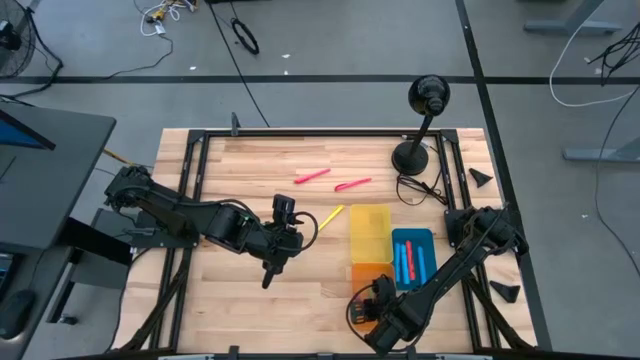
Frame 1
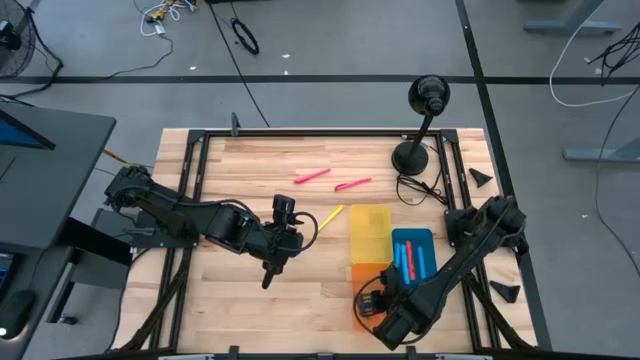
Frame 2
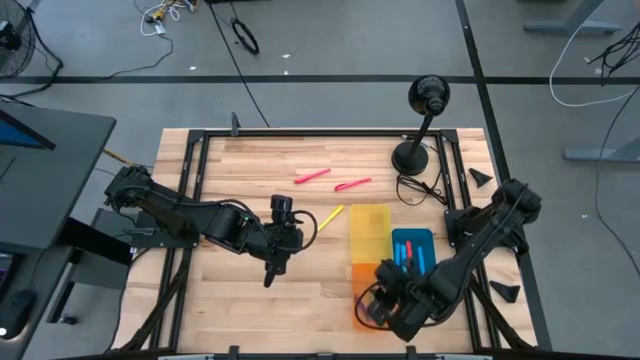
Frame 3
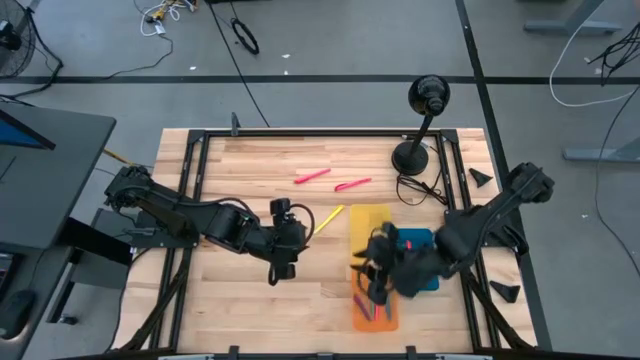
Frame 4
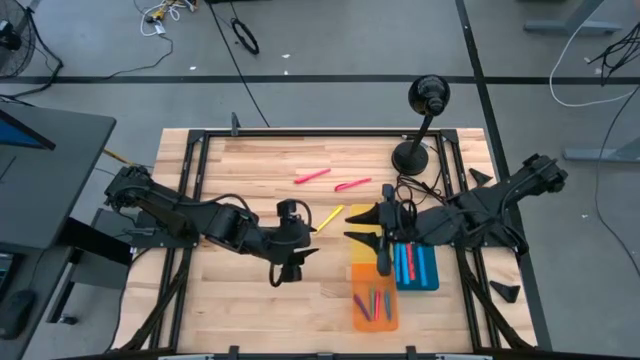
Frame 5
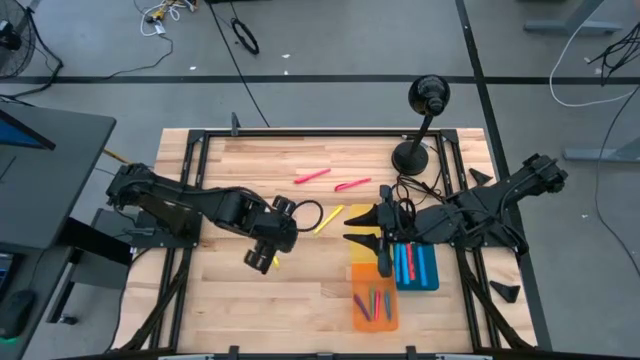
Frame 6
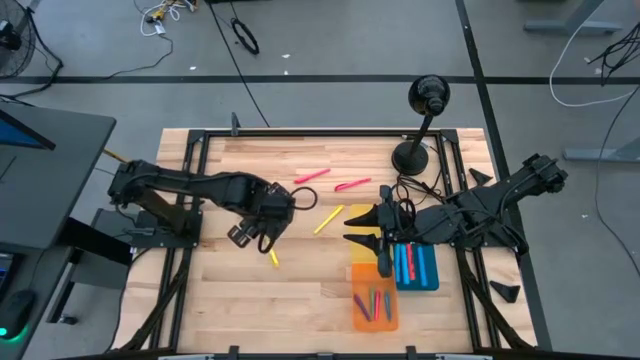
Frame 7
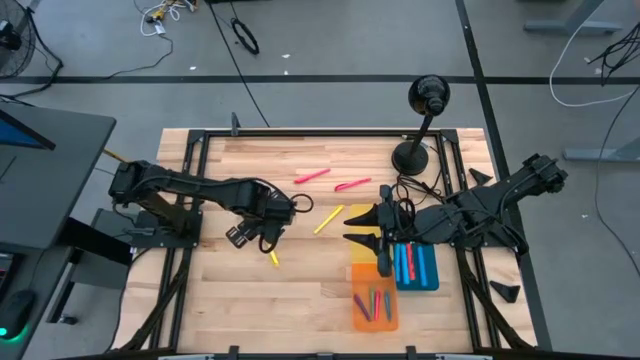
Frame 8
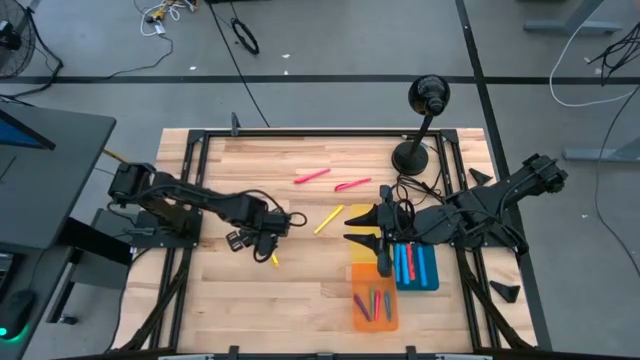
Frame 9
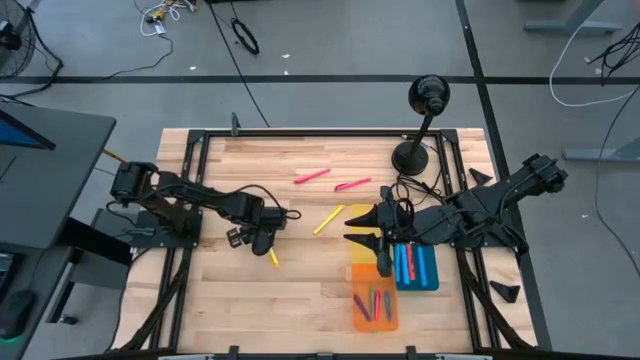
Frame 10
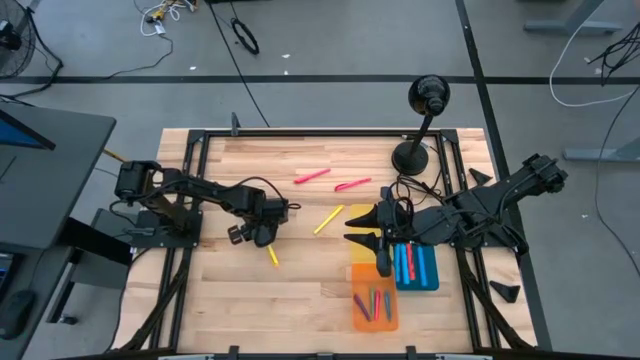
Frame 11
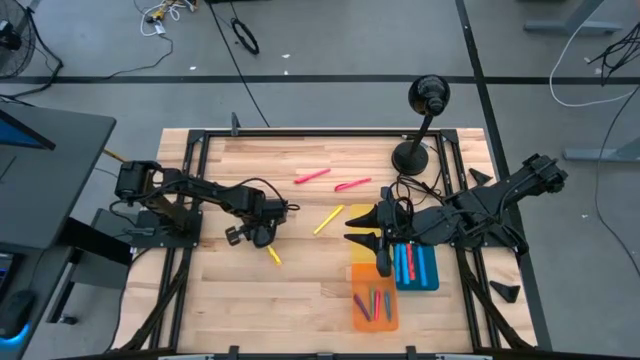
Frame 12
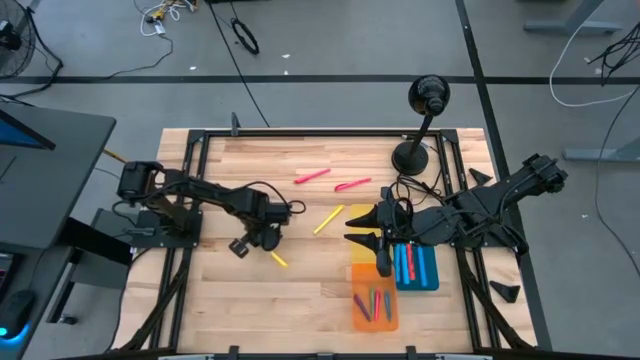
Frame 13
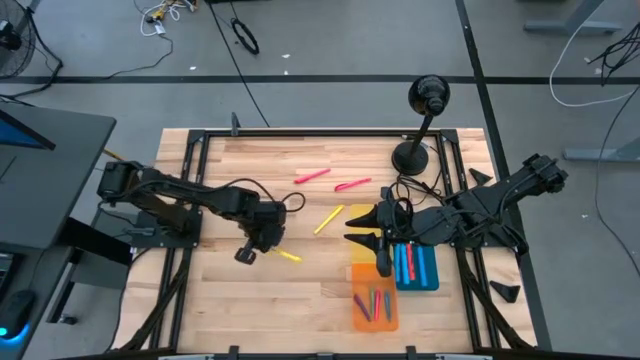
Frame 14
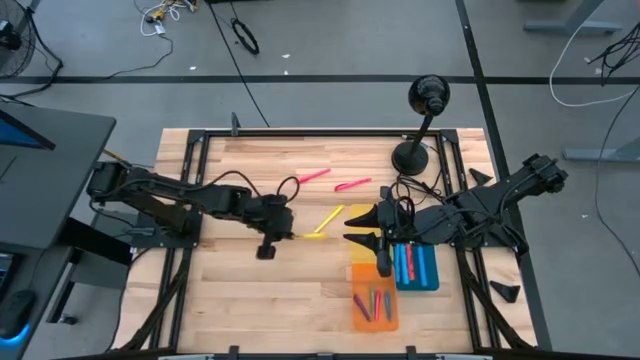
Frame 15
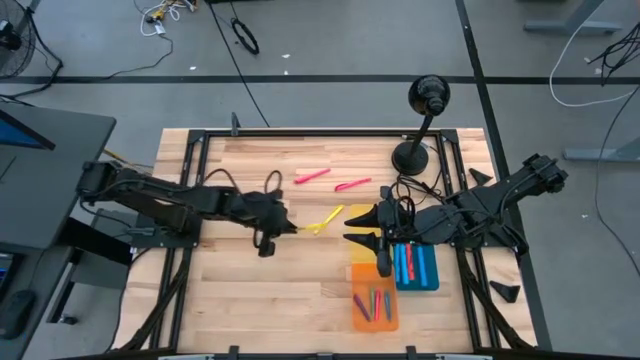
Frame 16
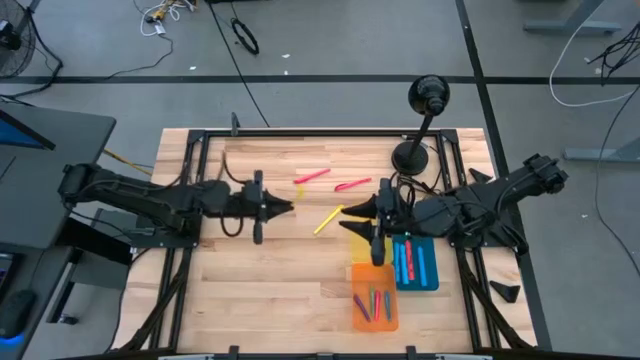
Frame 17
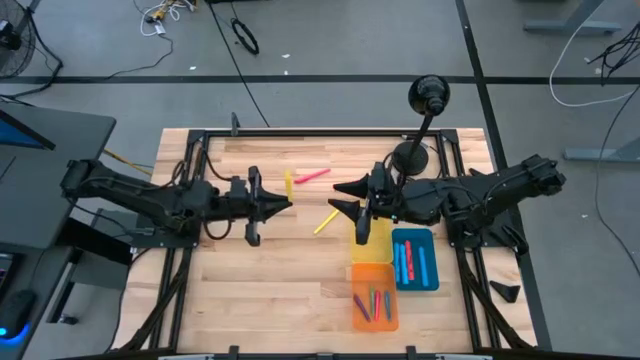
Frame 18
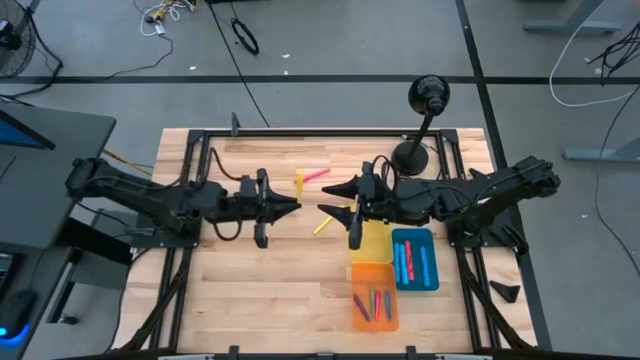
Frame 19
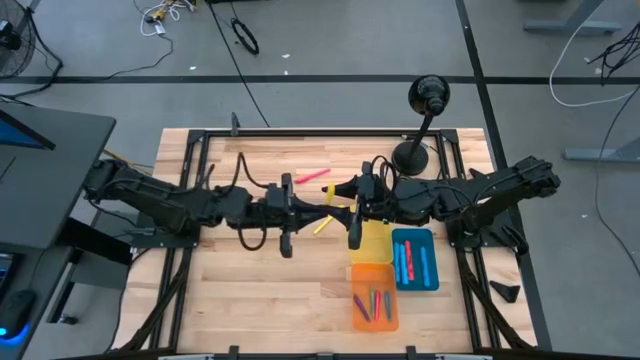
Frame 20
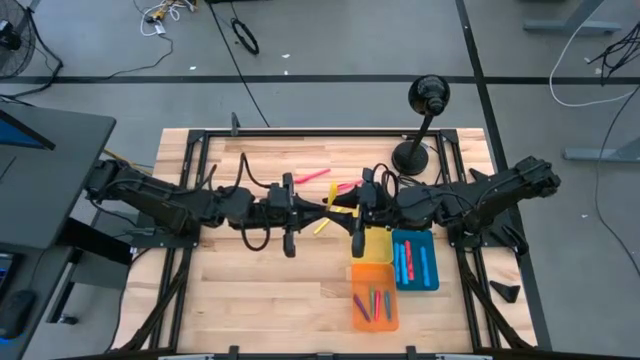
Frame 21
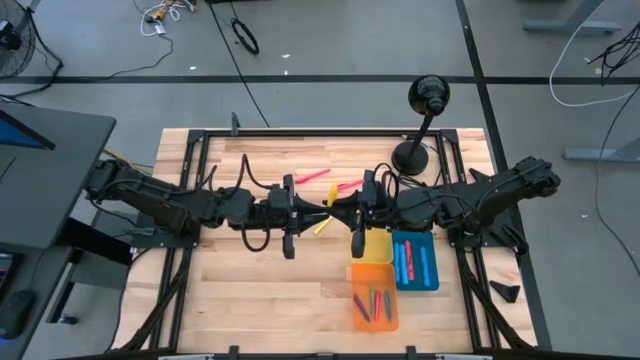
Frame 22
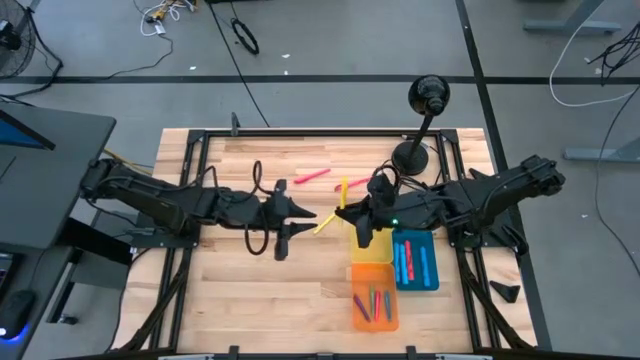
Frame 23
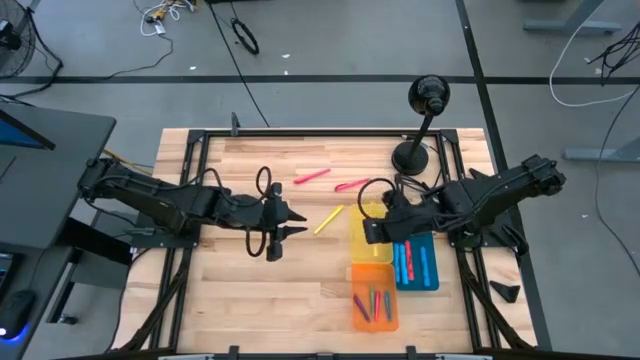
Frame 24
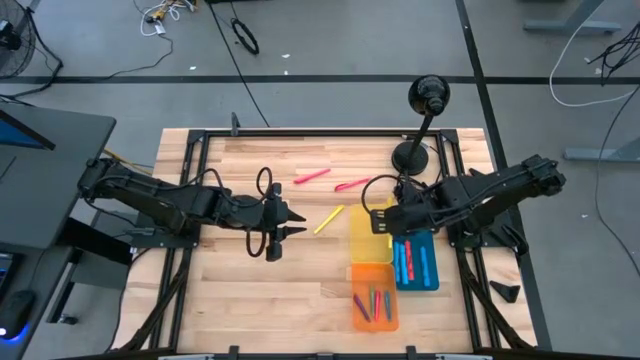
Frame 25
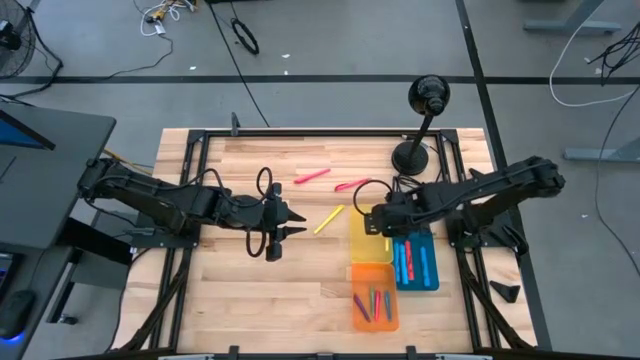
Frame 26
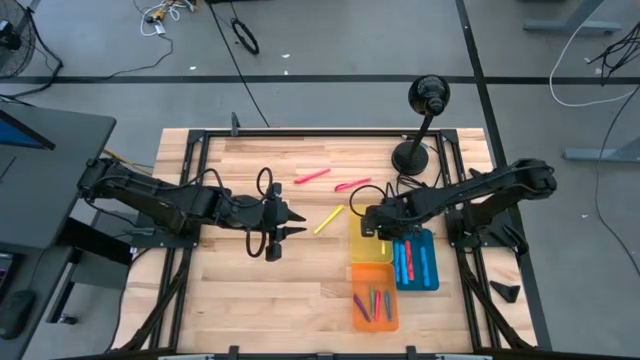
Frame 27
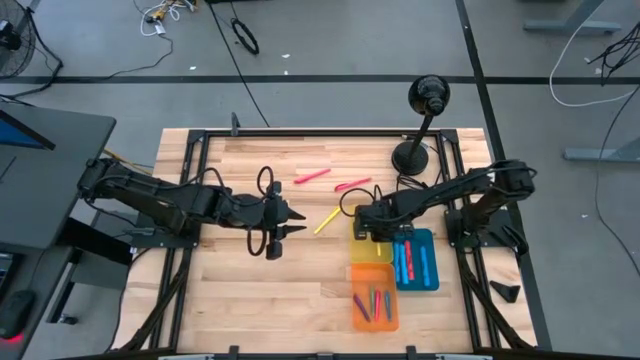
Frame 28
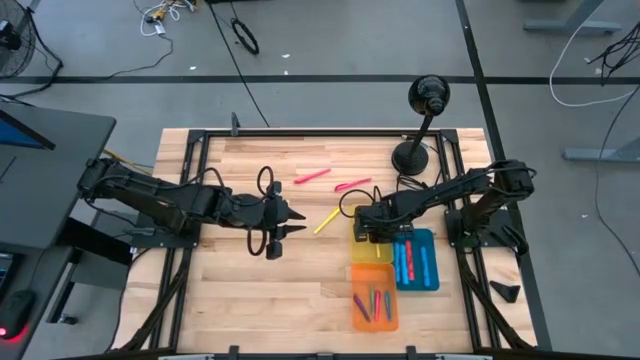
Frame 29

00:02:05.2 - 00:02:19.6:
Task: Pick & Place Markers
Put the left yellow pen into the yellow bin

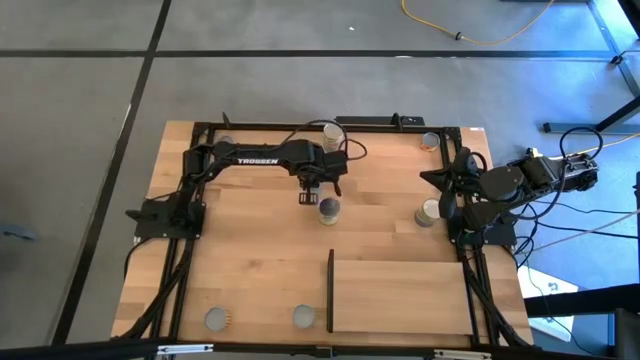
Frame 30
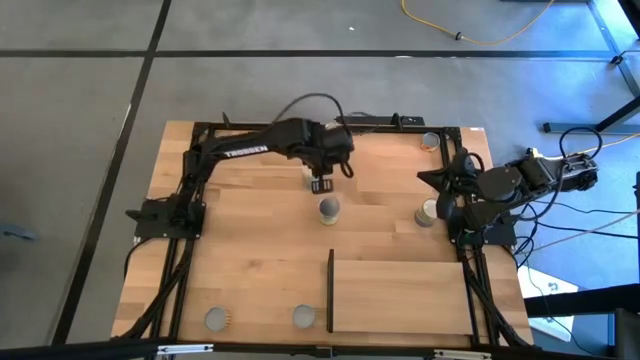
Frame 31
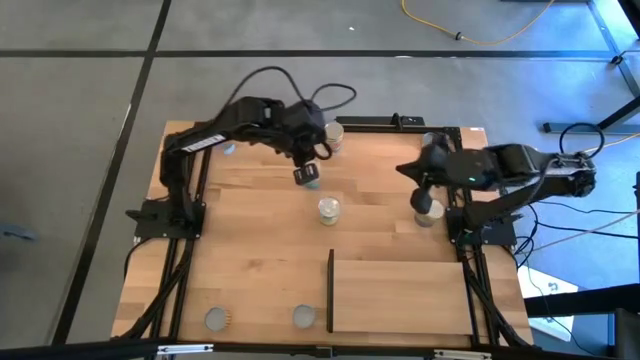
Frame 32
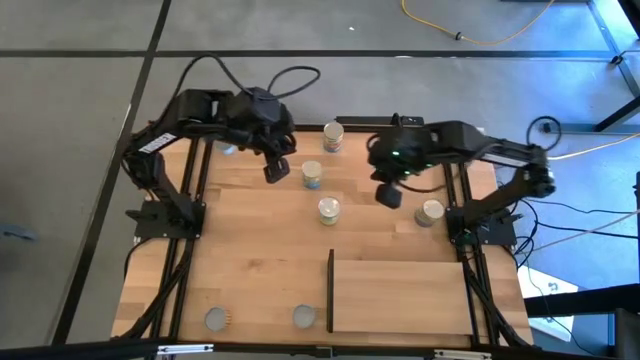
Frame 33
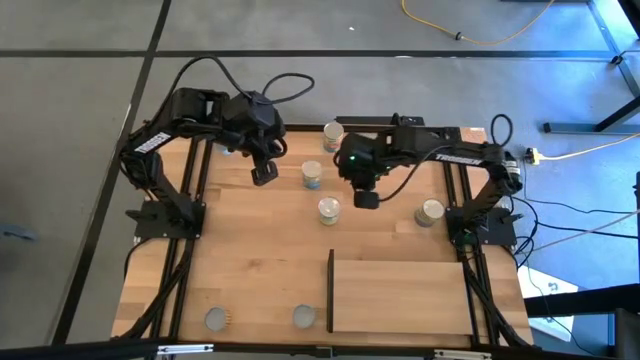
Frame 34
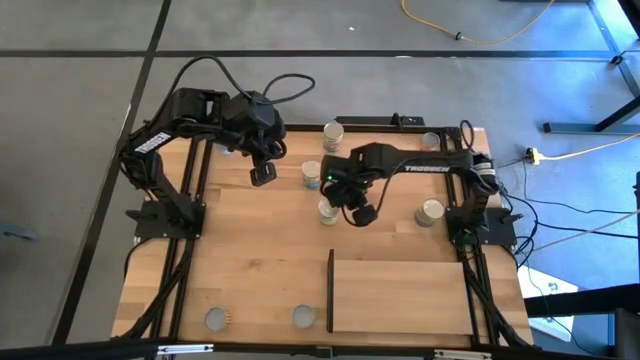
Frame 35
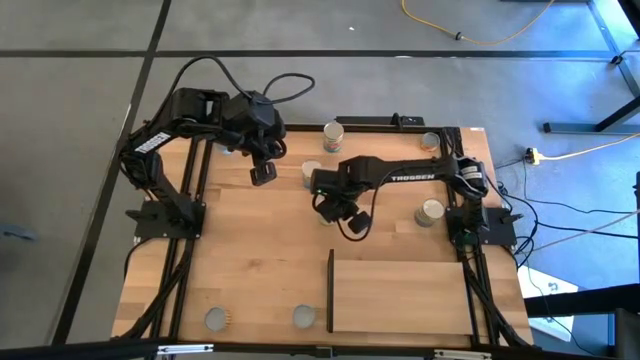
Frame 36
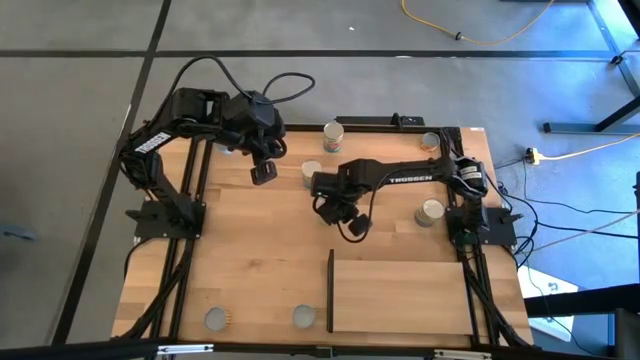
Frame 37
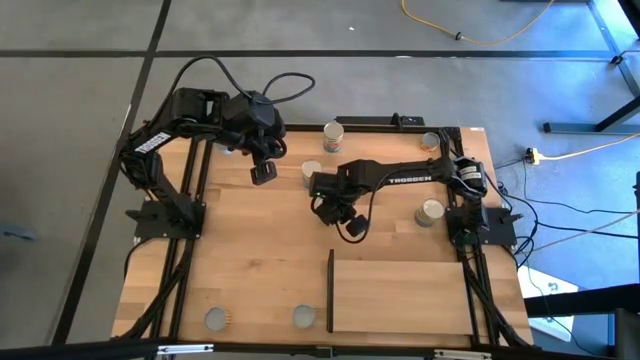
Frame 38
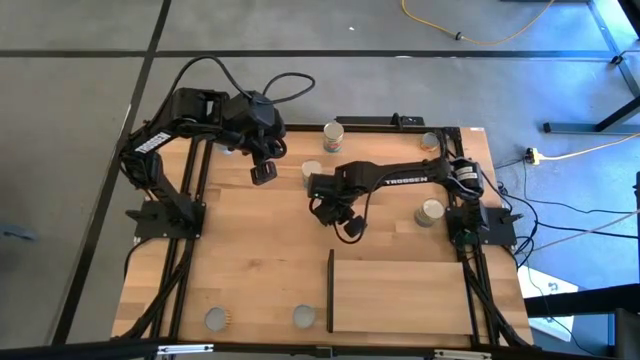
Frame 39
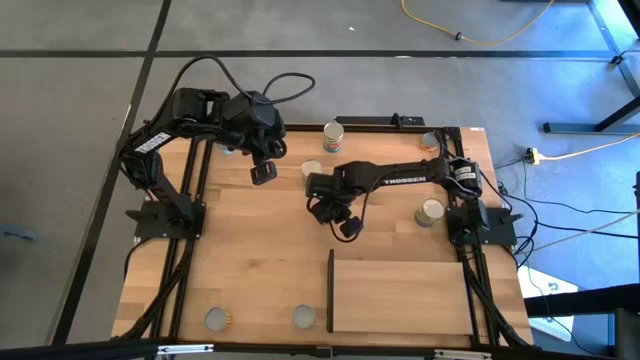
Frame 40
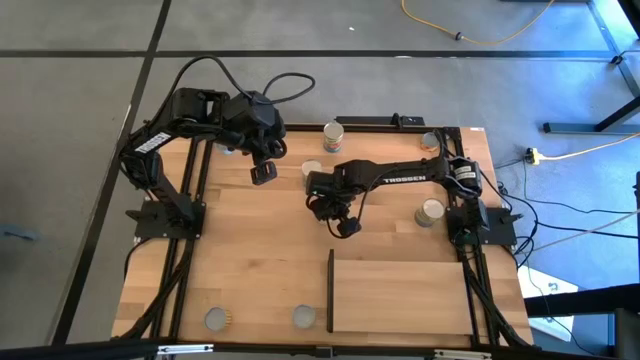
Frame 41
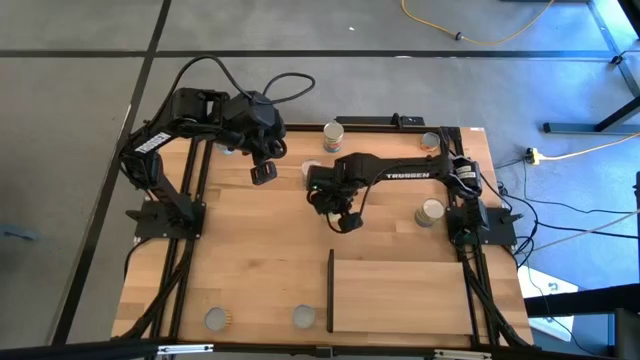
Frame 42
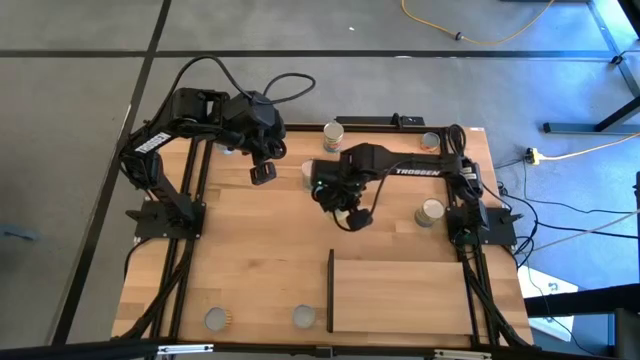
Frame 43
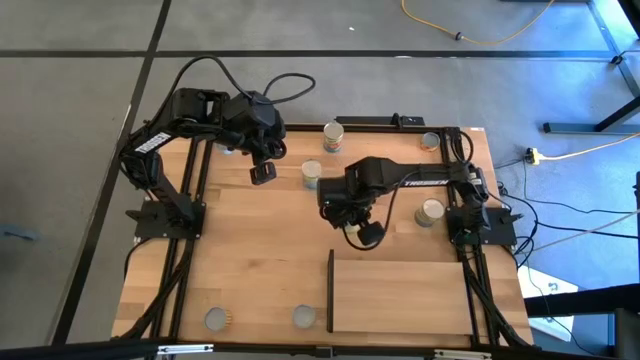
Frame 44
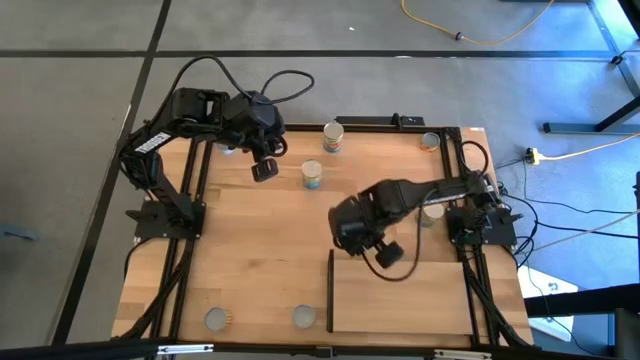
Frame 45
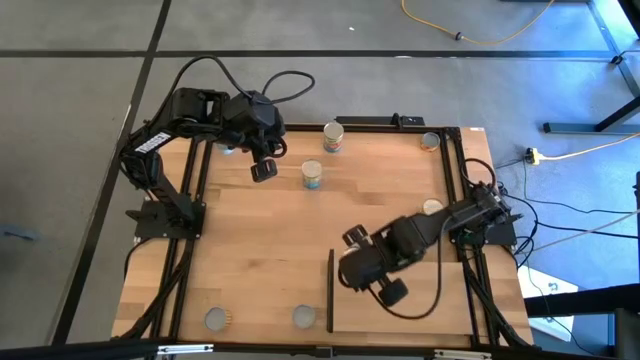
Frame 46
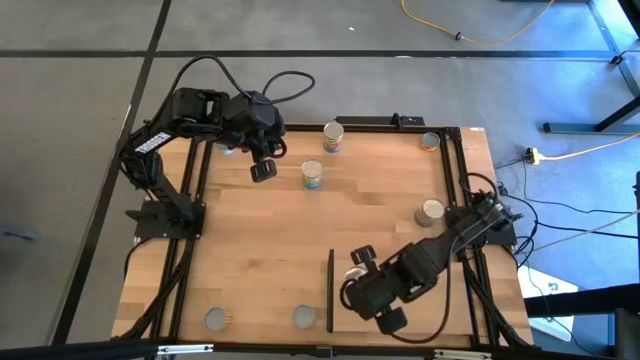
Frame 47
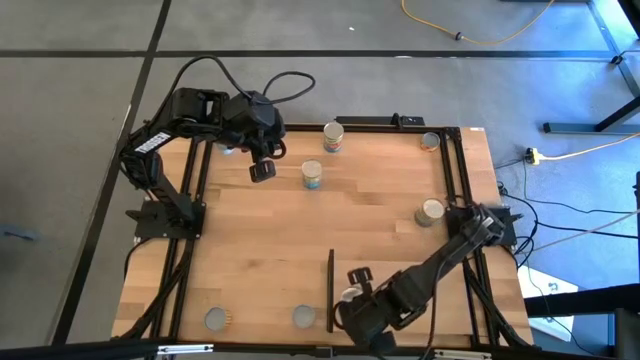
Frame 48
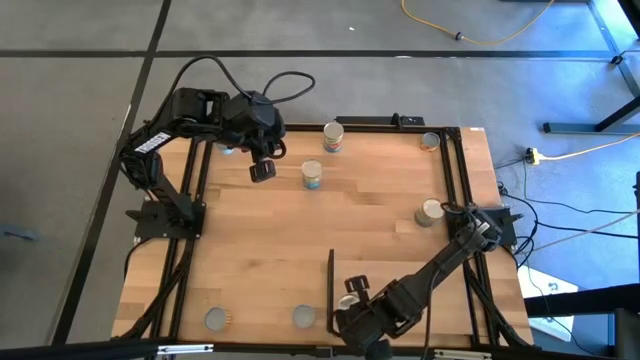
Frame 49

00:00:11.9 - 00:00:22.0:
Task: Pick and place cans onto a shelf
Put the canned carrots on the shelf
